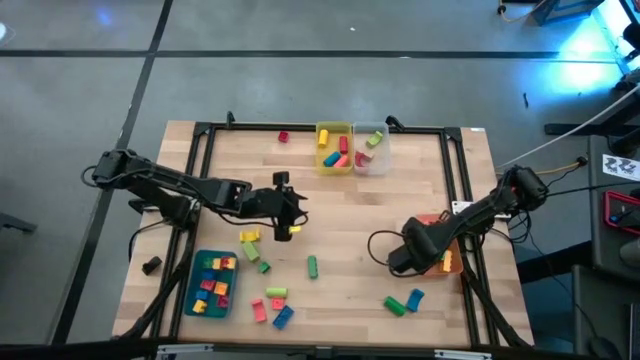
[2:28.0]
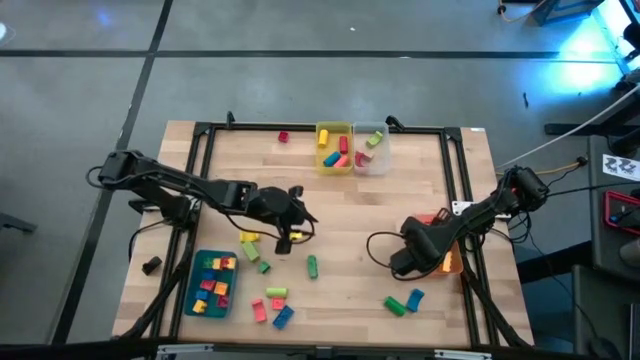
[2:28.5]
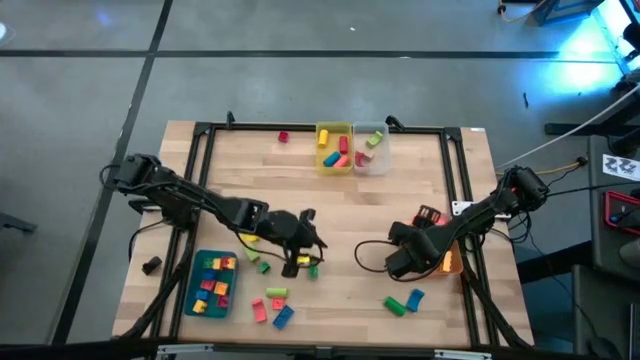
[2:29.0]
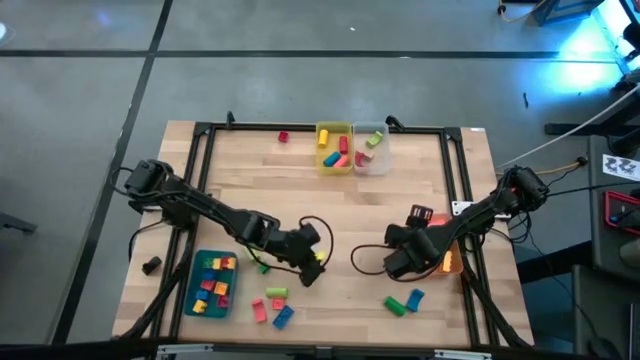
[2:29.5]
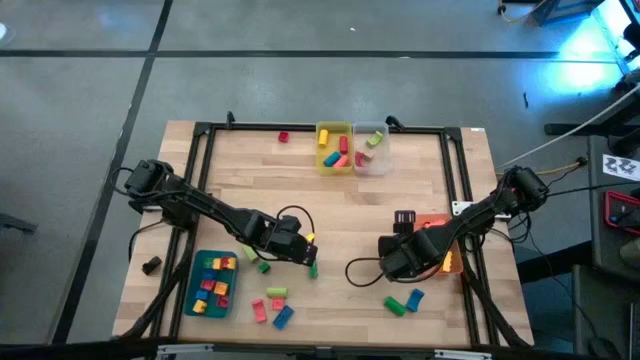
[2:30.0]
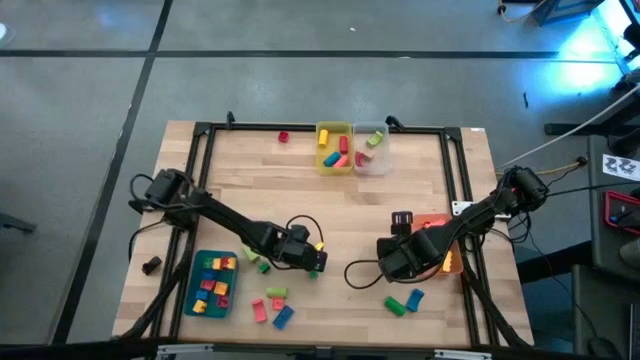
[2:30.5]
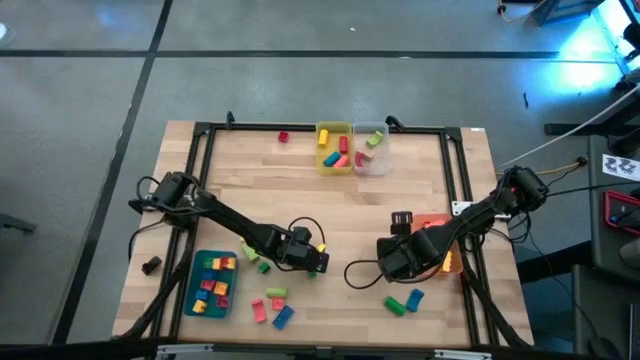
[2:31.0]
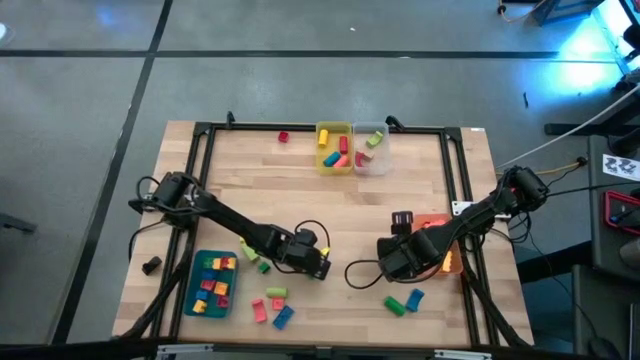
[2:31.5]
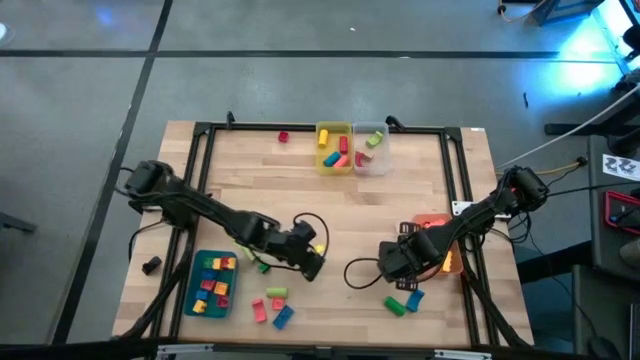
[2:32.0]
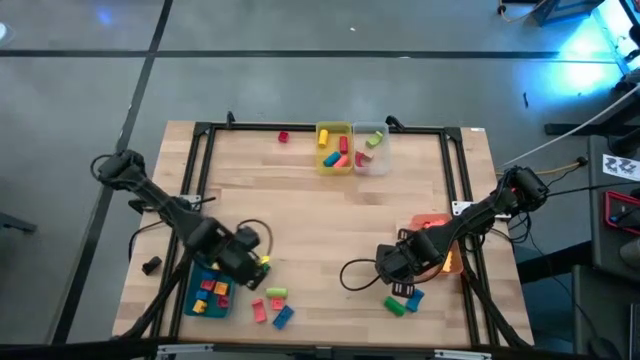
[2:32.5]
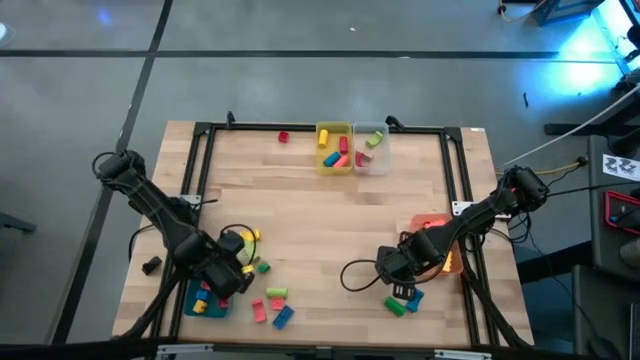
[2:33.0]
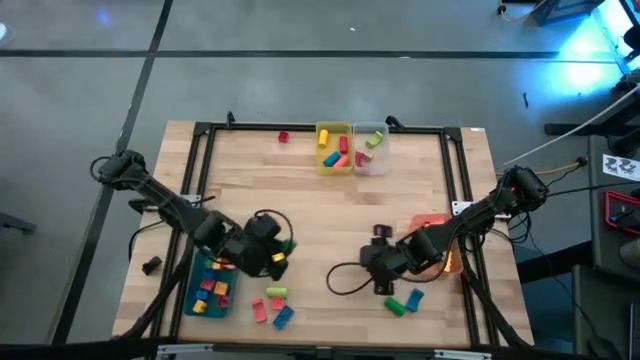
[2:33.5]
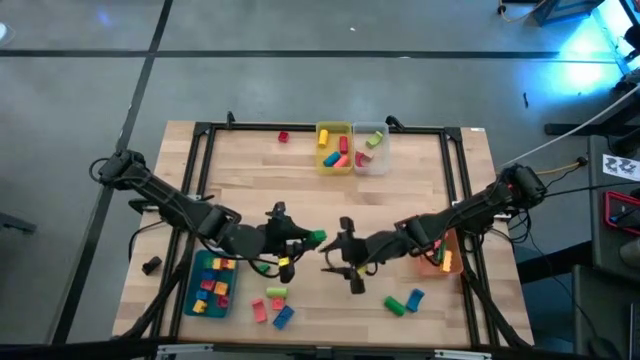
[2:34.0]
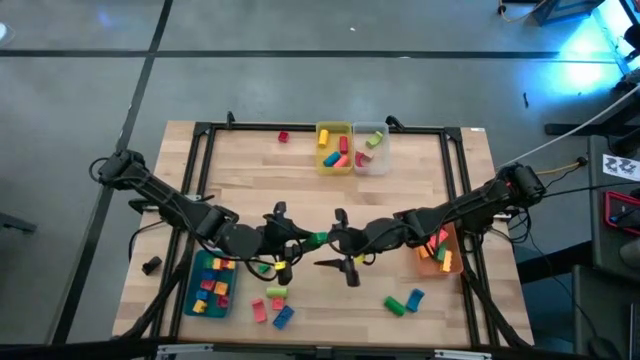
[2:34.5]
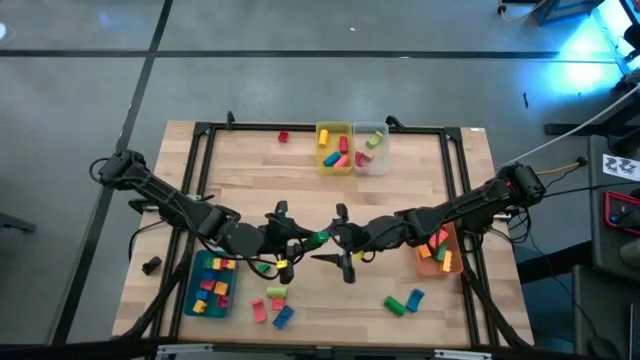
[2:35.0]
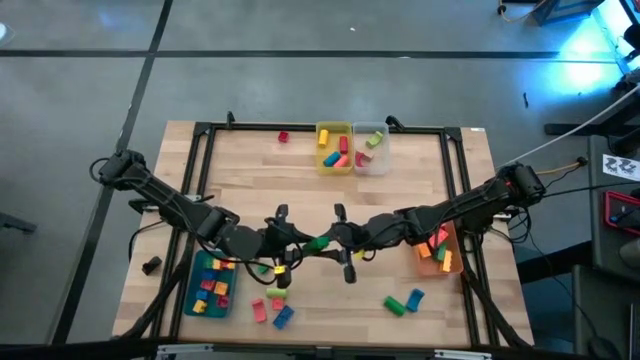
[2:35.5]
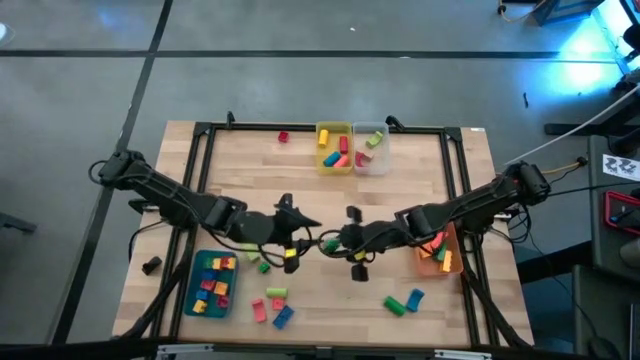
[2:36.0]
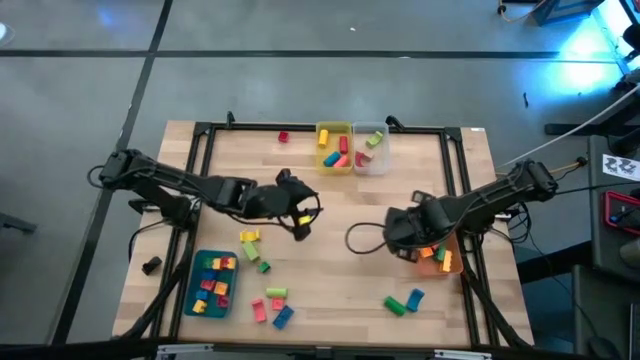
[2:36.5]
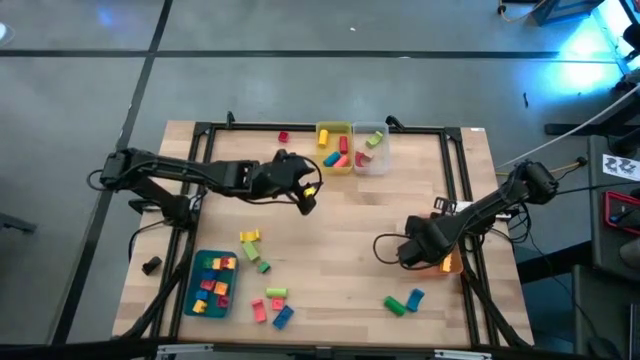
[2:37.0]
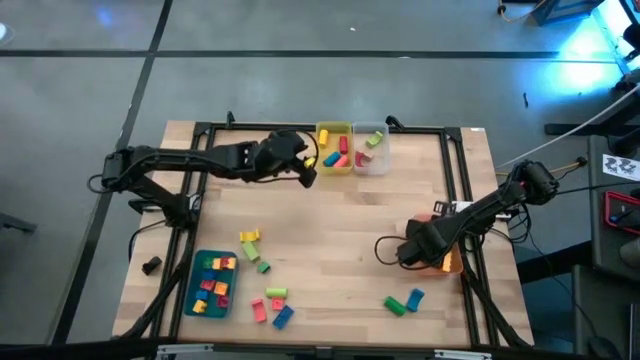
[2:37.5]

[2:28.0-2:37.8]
Task: Sort blocks by size
Put the green rectangular game piece into the orange bin

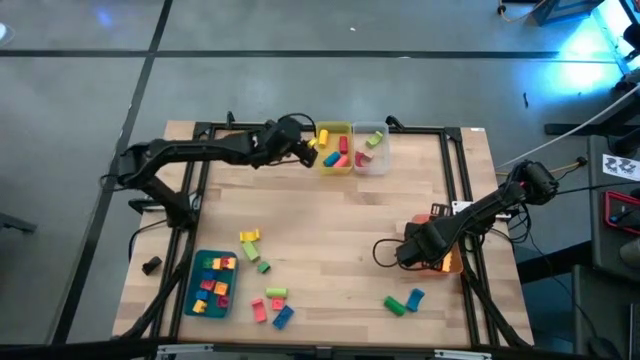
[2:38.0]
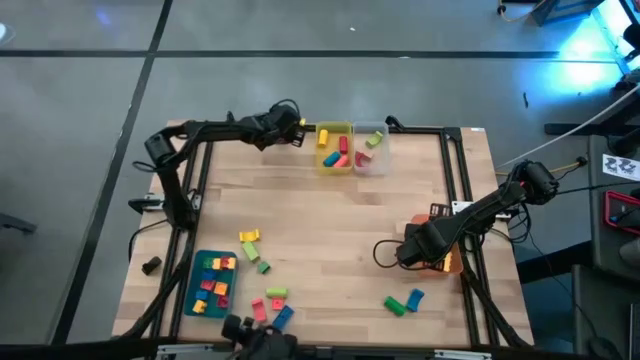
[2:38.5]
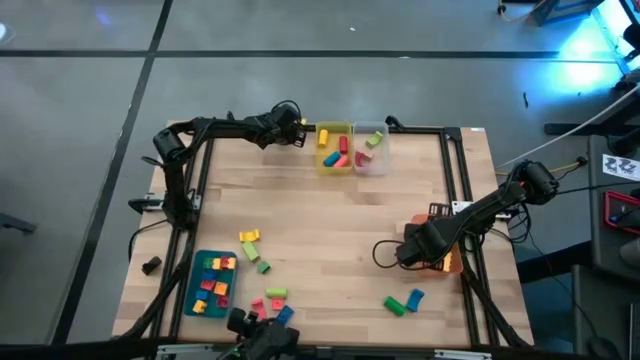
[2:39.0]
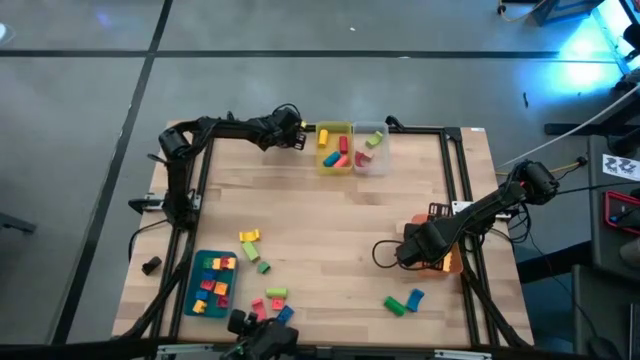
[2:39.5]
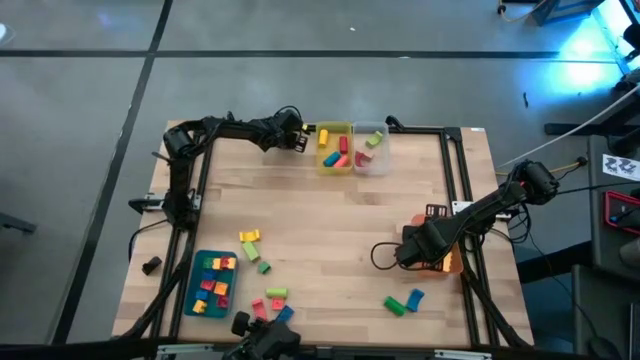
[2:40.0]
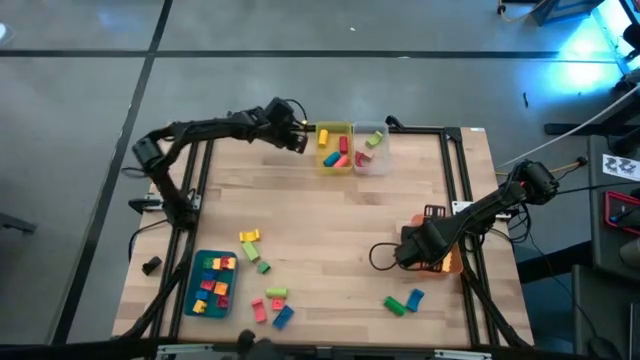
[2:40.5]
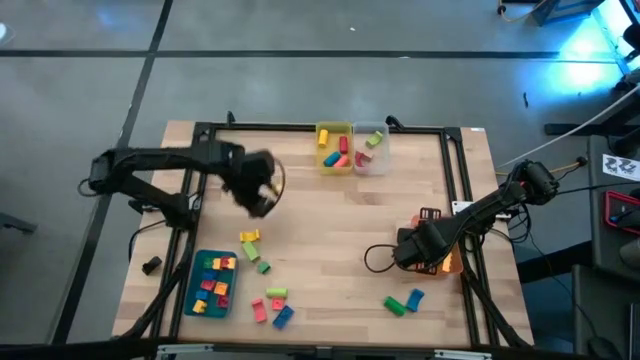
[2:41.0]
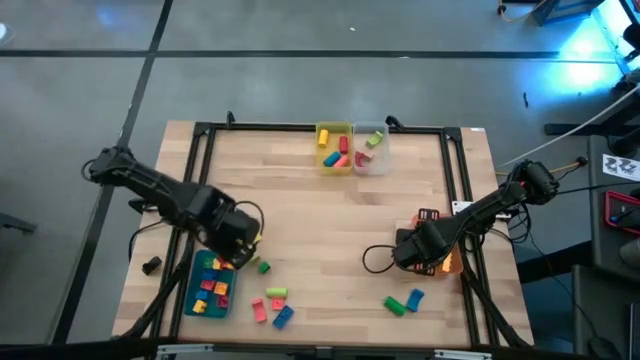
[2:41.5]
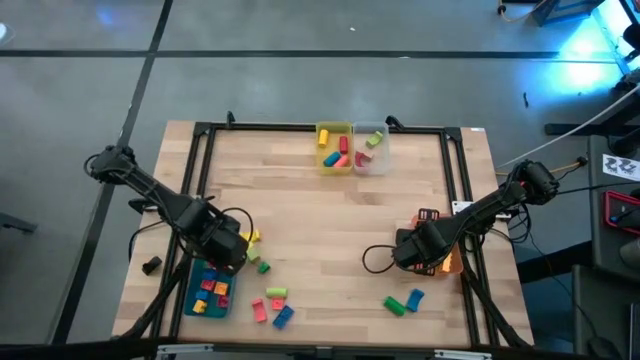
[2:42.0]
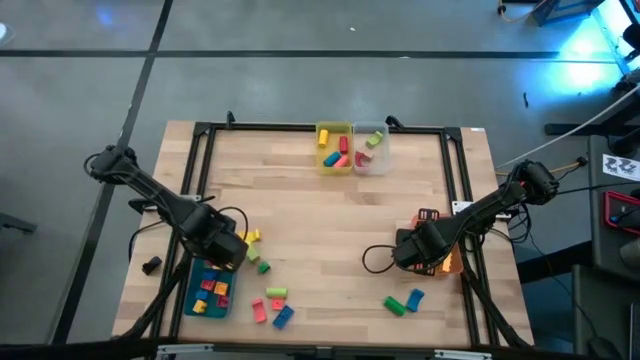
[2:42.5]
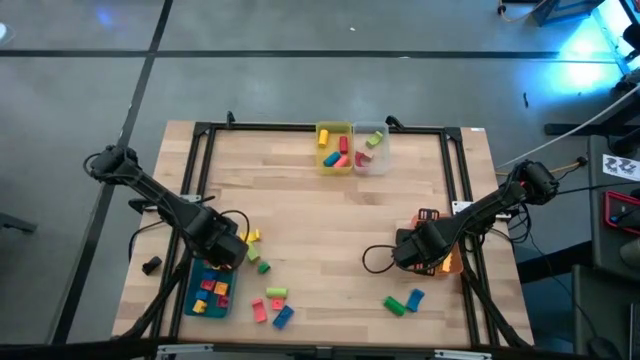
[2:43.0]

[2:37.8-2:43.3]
Put the red square game piece into the blue bin

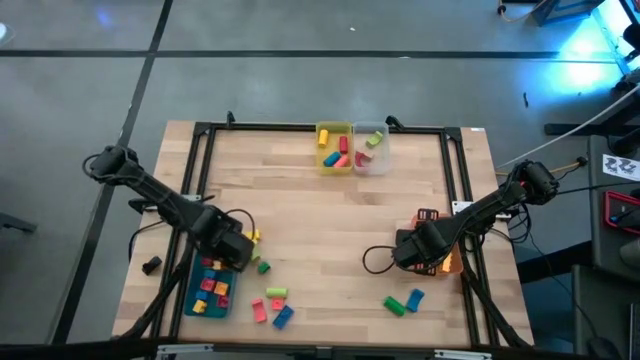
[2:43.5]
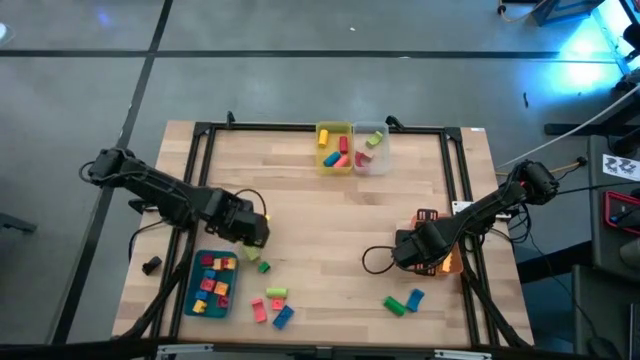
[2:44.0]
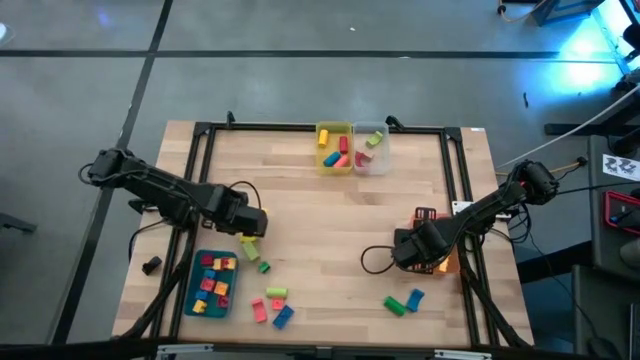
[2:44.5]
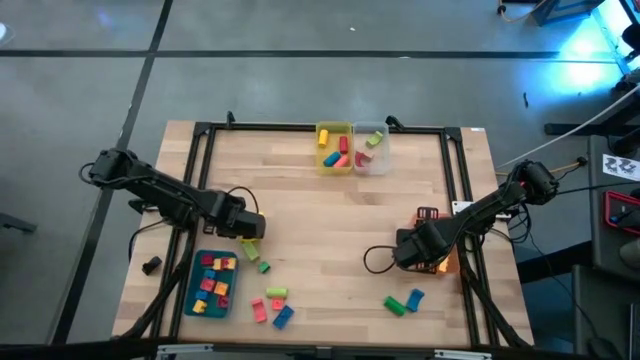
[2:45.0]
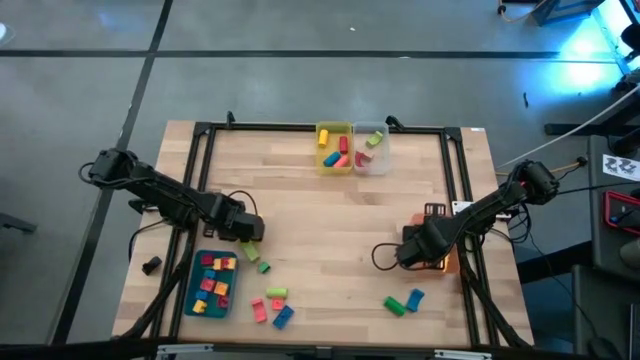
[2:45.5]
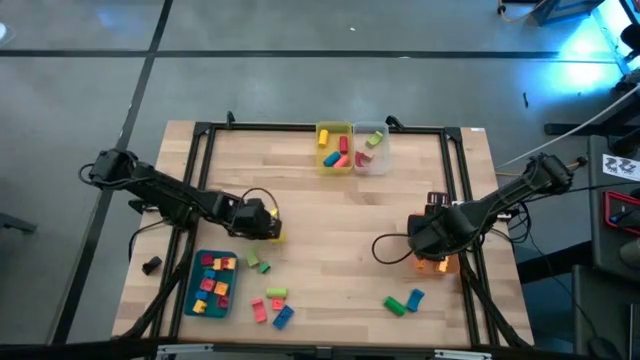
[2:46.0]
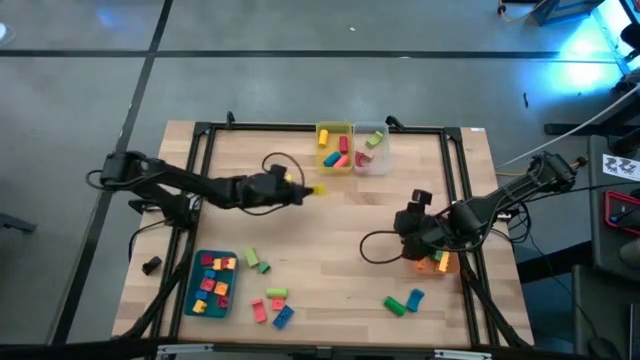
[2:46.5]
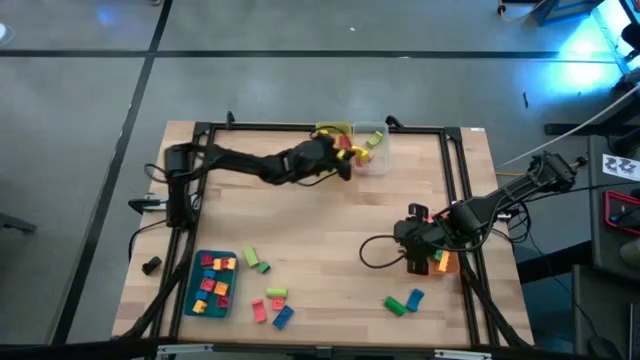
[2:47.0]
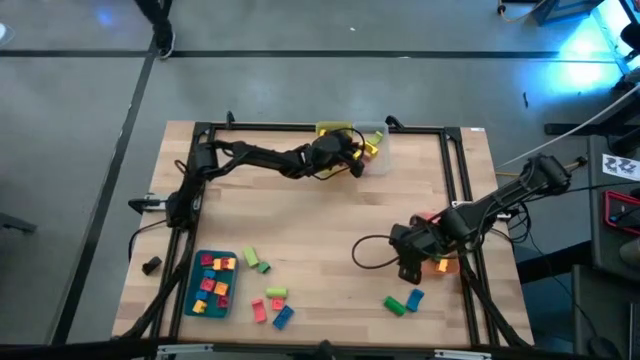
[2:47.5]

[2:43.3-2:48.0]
Put the yellow half circle block into the transparent bin

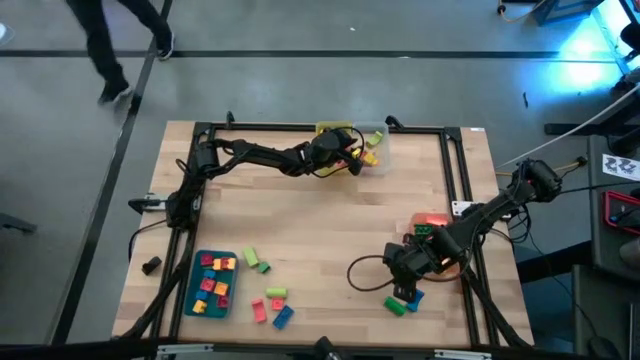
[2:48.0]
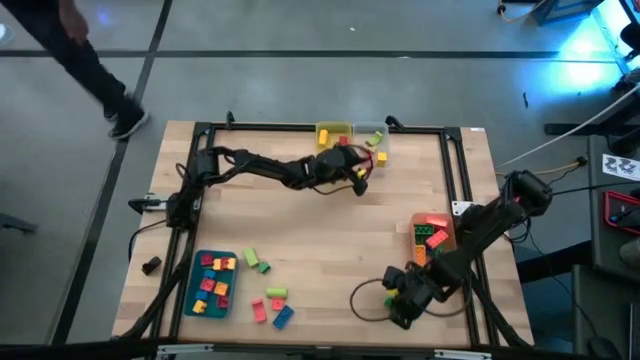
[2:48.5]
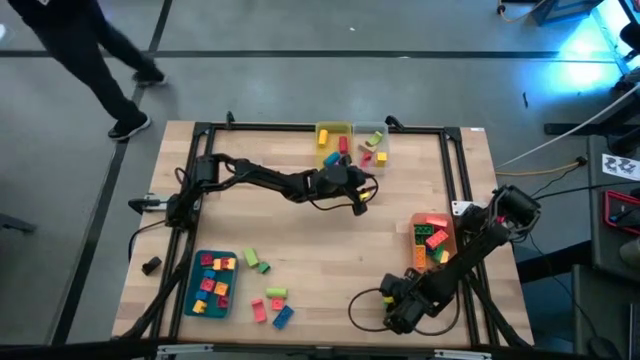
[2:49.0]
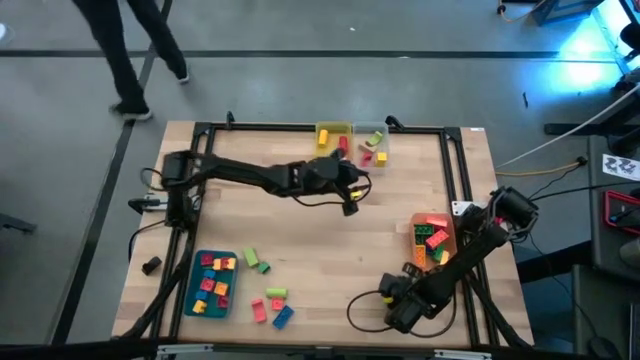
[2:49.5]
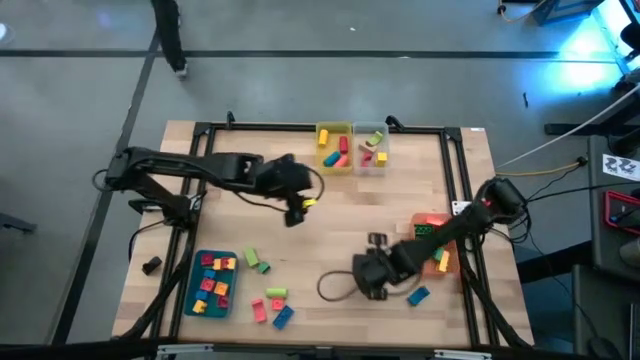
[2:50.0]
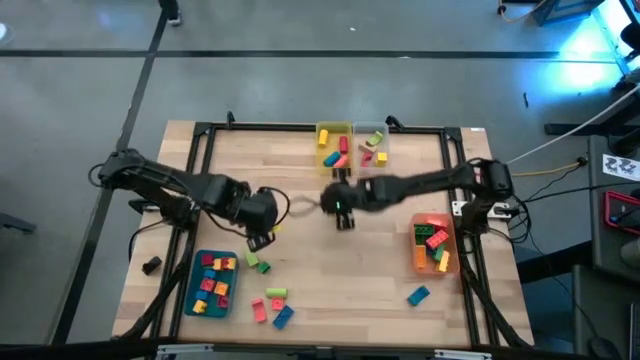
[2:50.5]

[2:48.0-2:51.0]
Put the green cylindrical block into the yellow bin
